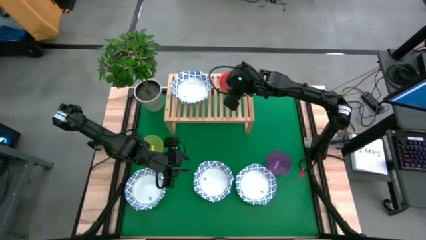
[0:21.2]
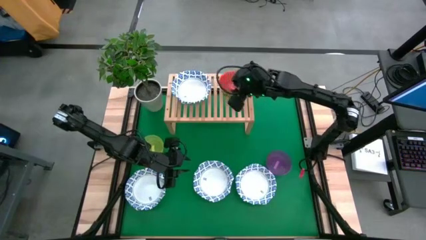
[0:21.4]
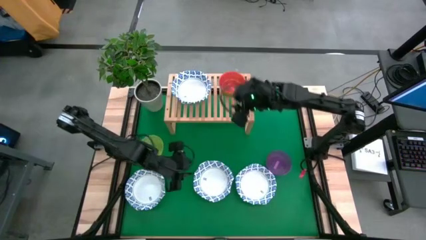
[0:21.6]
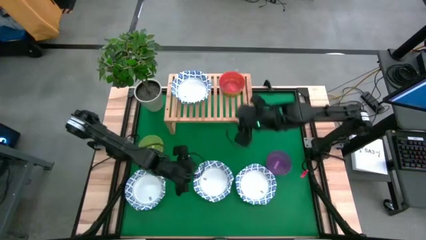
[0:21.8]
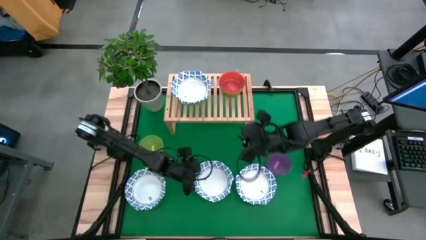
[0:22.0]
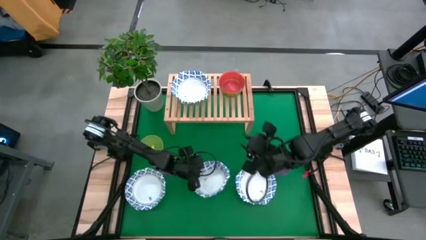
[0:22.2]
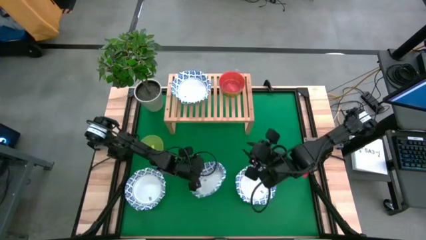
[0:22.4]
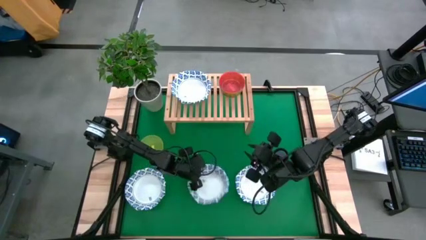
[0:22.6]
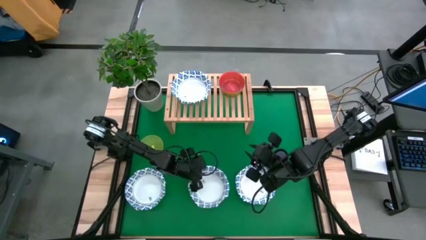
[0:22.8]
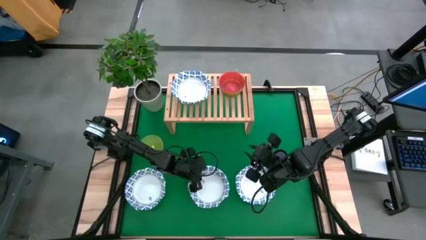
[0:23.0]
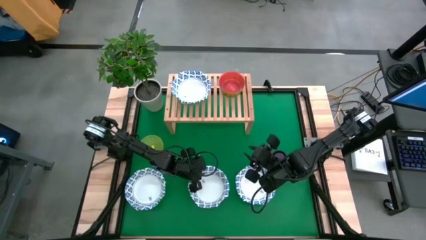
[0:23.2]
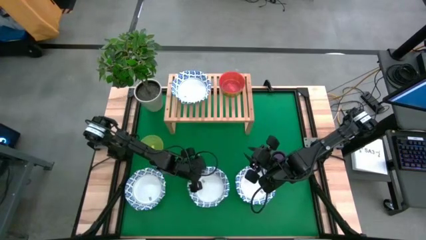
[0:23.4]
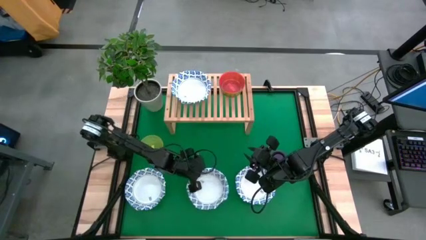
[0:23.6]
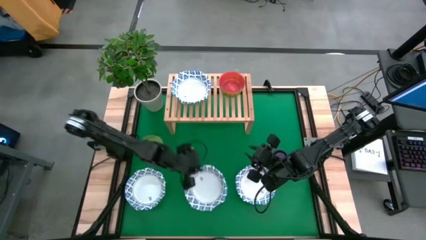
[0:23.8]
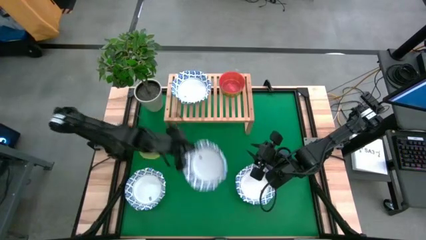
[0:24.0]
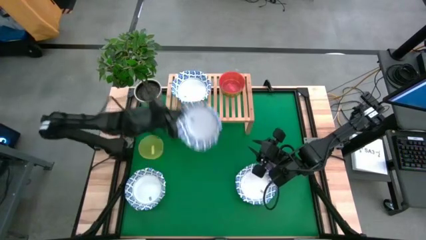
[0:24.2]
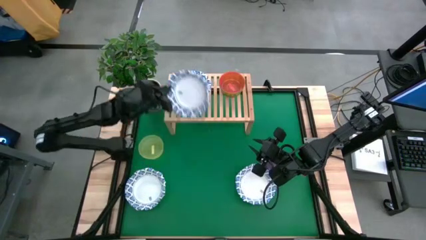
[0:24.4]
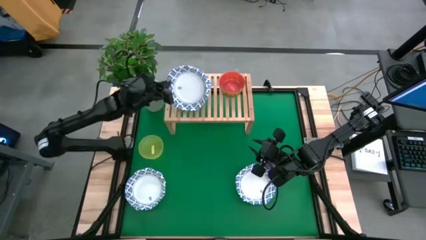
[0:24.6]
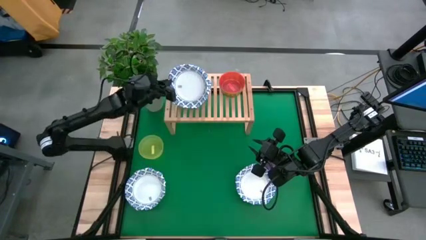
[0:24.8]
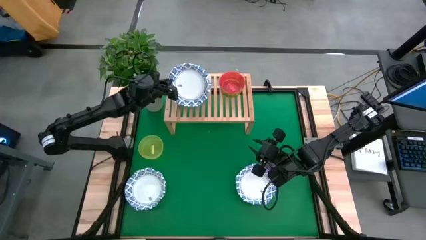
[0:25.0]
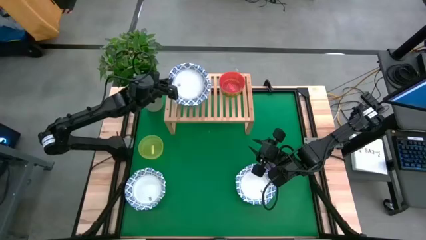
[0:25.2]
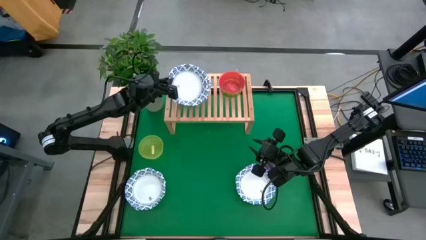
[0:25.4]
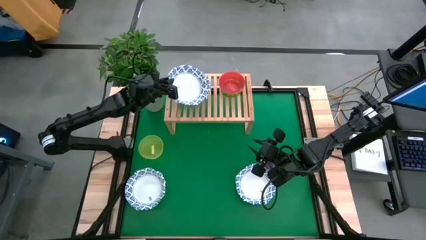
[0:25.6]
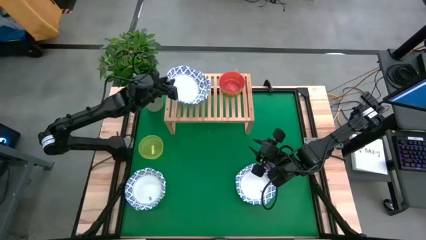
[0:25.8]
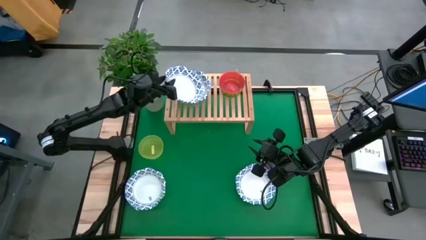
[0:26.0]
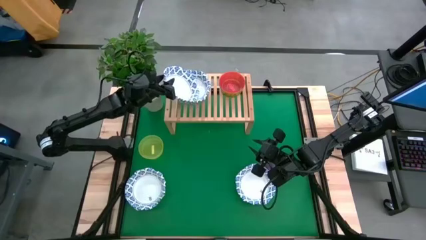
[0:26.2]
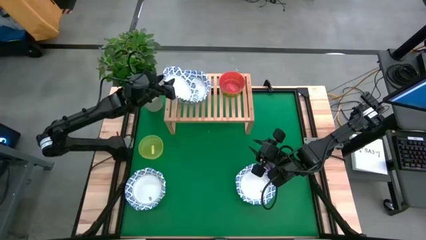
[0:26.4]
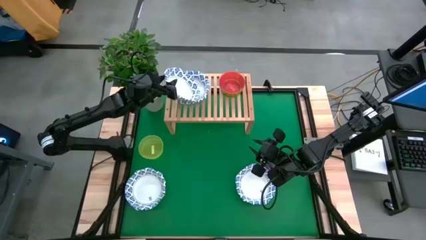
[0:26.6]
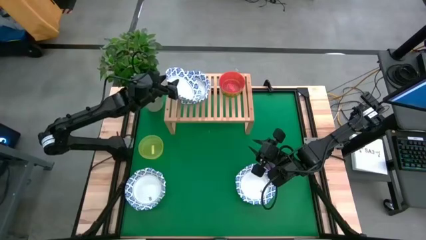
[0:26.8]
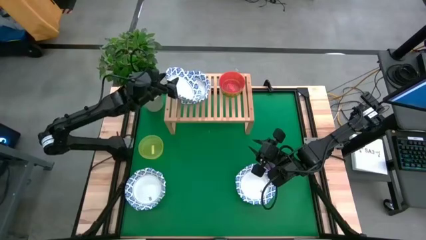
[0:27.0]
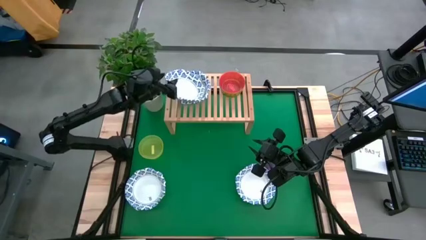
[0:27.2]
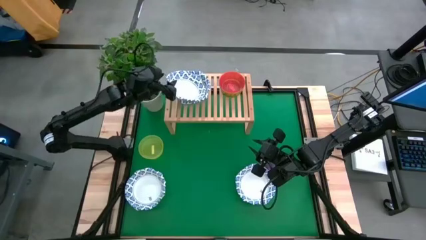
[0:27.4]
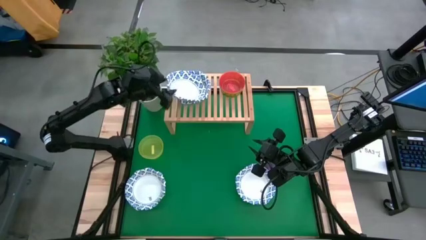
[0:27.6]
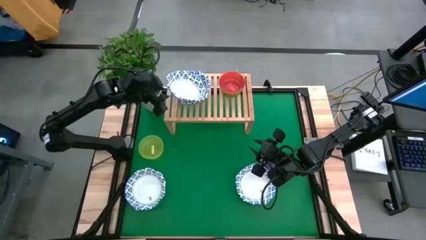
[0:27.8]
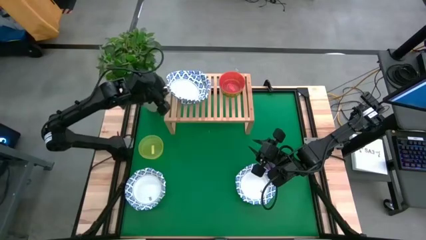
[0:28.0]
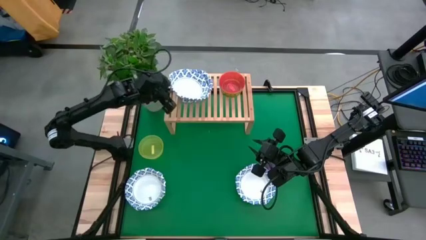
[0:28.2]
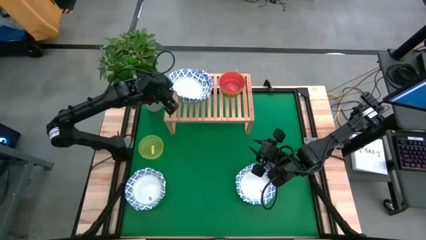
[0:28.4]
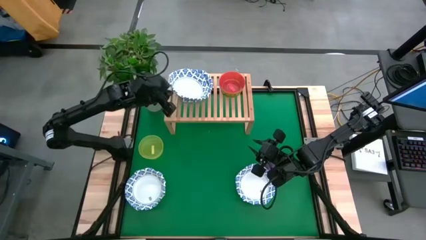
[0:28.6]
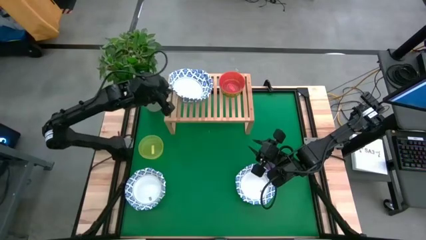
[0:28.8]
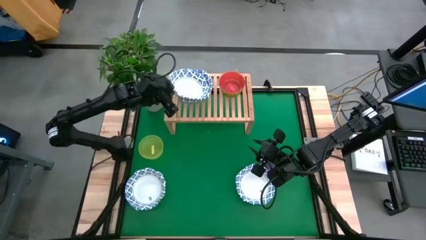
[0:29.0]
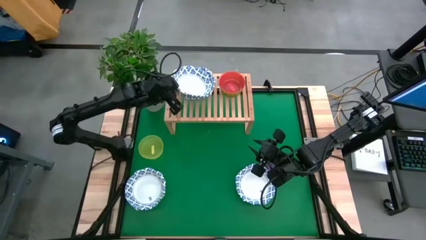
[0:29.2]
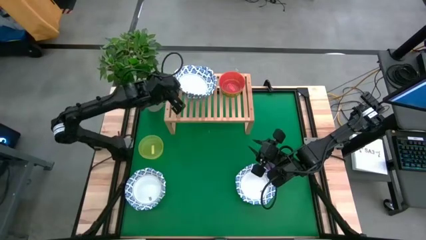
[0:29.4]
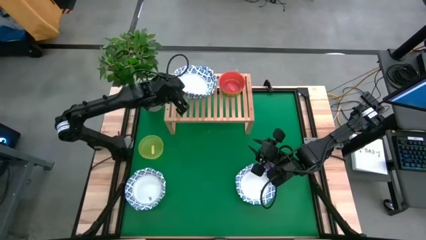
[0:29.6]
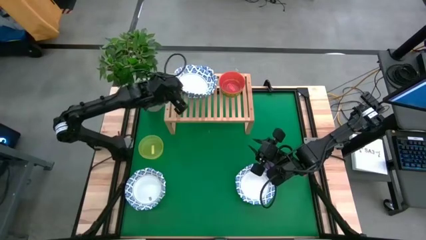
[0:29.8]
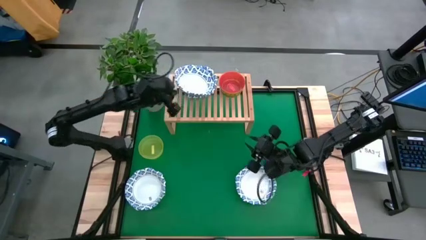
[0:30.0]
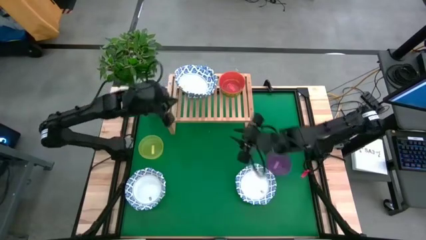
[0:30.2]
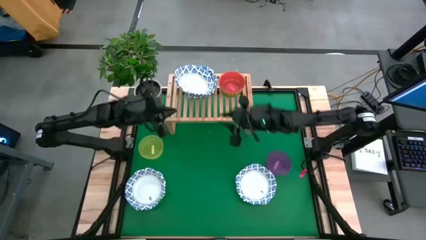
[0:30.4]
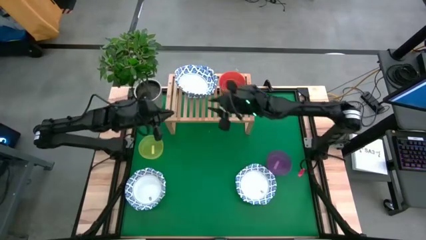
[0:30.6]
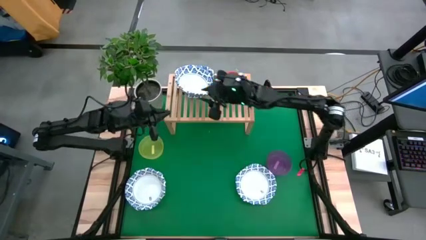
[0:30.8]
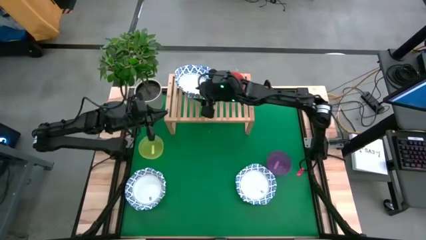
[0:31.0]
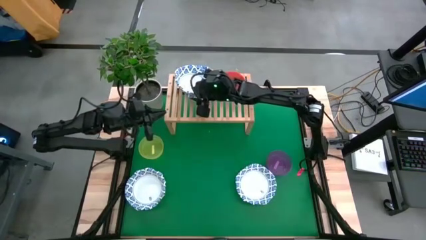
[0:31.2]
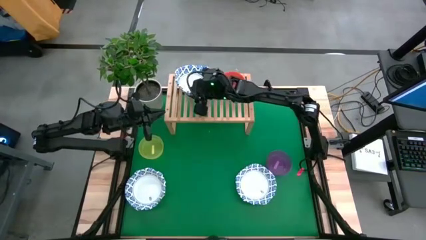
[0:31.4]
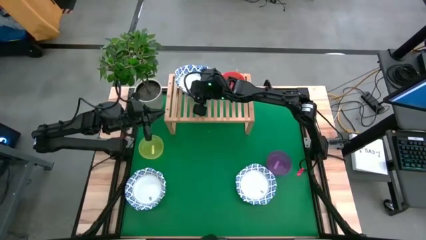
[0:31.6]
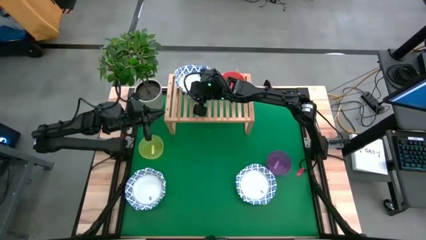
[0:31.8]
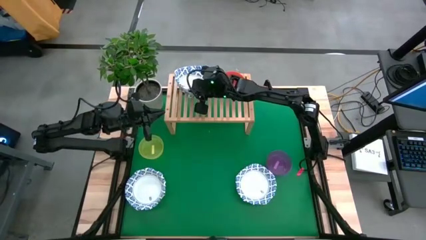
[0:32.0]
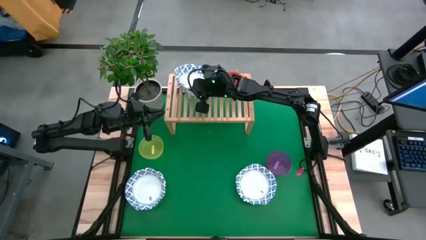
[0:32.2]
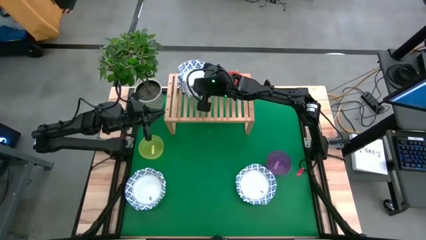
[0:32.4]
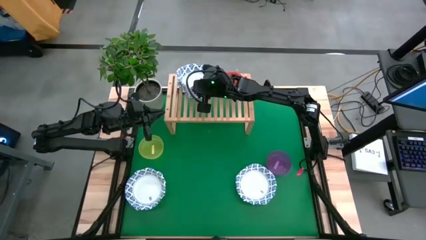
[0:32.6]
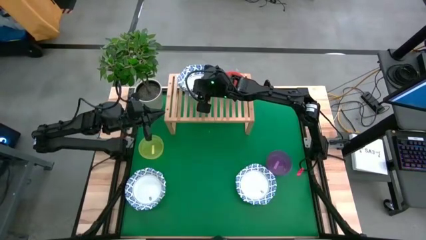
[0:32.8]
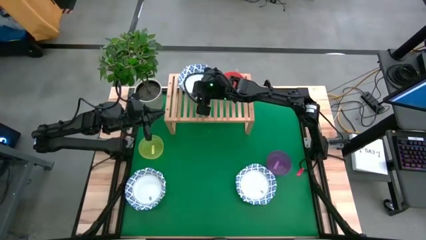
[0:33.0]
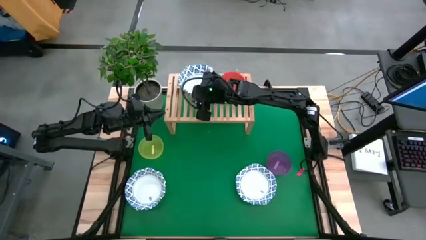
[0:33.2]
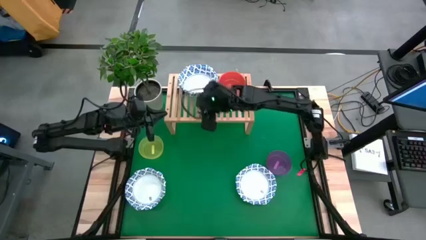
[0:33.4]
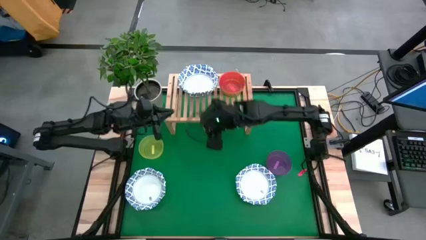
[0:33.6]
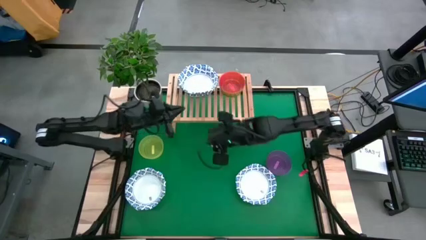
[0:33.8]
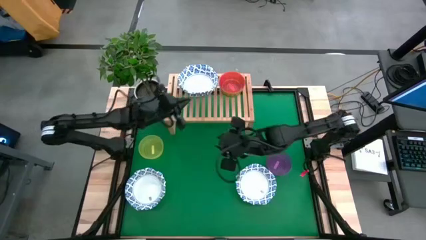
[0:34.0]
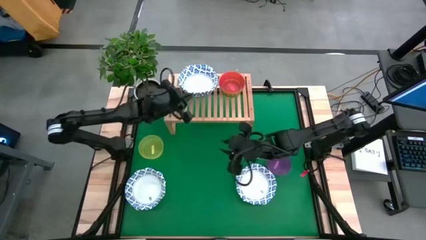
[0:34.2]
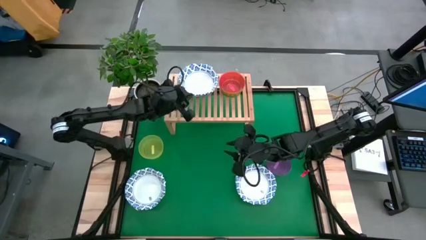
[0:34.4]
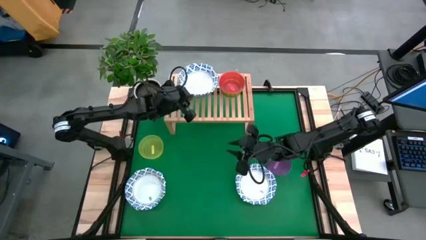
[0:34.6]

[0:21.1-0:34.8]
Task: Place and stack bowls onto a shelf
Stack the white patterned bowl on top of the white patterned bowl on the shelf

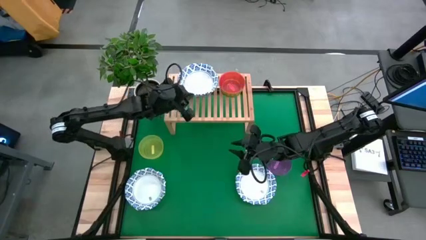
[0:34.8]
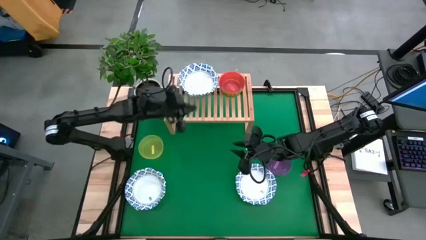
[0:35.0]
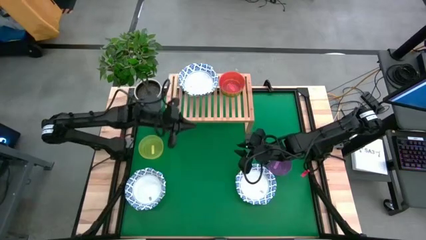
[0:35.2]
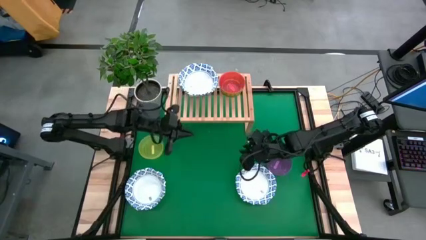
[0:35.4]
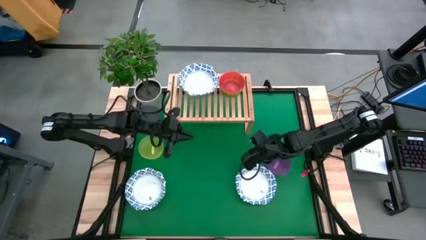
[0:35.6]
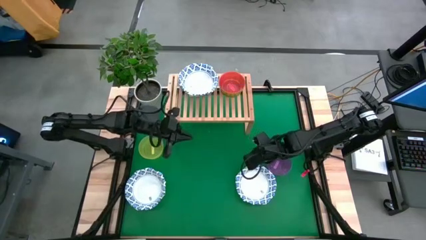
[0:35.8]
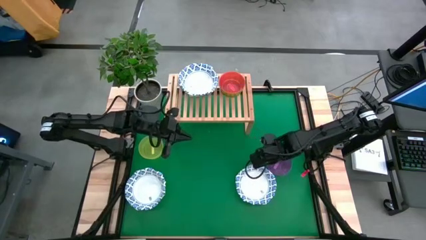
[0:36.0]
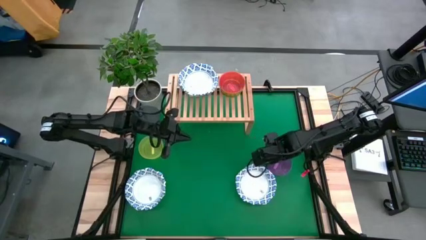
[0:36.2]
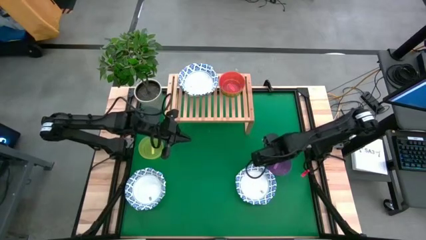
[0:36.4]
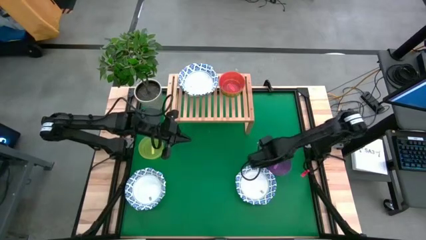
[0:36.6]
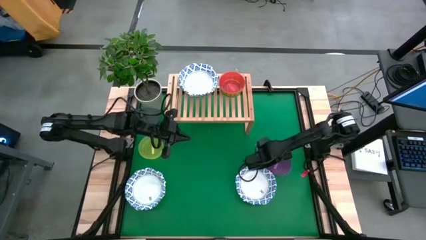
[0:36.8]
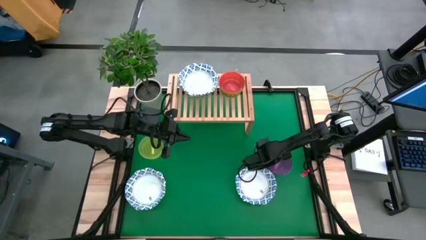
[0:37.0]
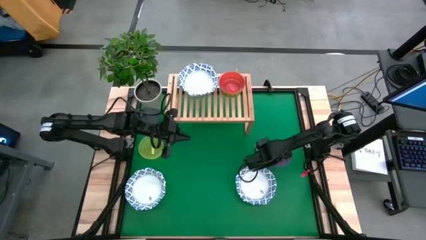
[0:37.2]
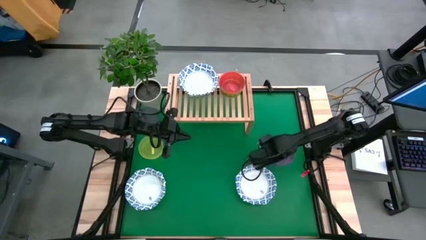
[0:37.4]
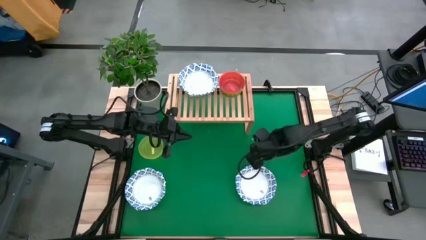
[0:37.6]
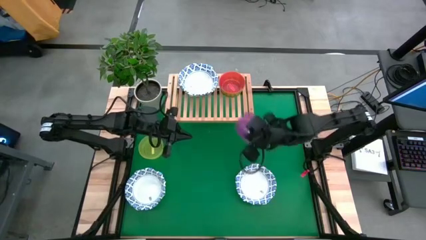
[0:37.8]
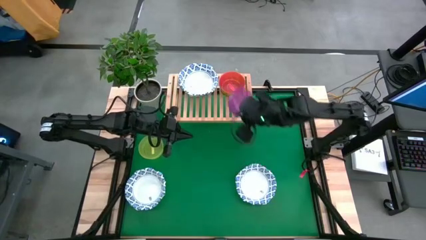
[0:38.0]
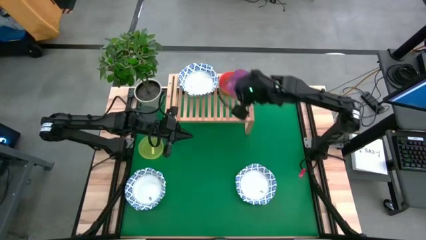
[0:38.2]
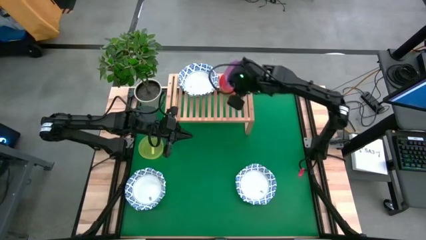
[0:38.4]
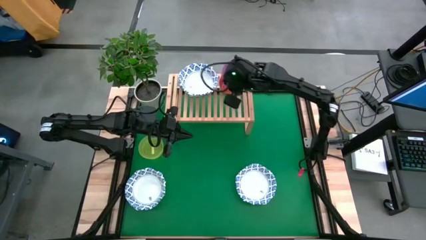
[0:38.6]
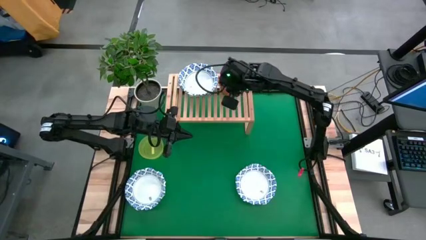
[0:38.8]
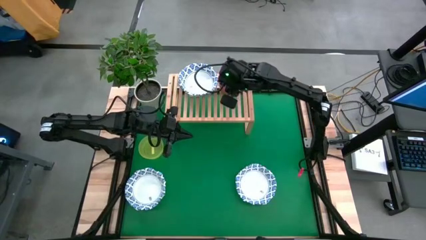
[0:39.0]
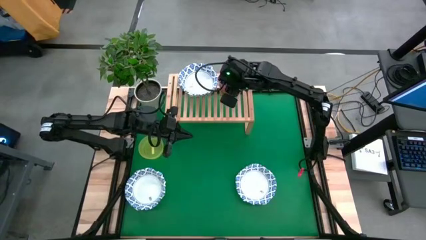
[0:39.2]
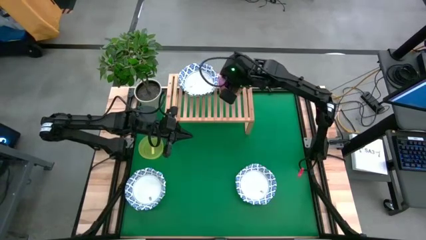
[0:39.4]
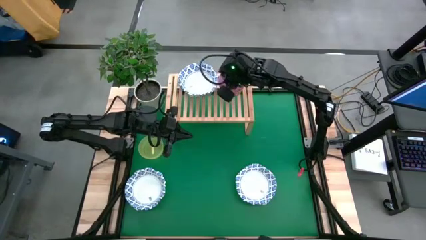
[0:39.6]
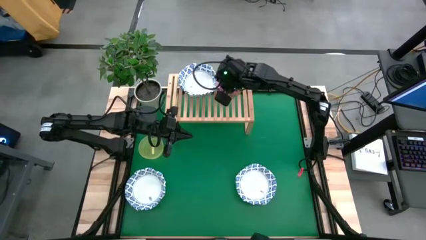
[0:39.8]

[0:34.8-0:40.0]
Stack the purple bowl on top of the orange bowl on the shelf
